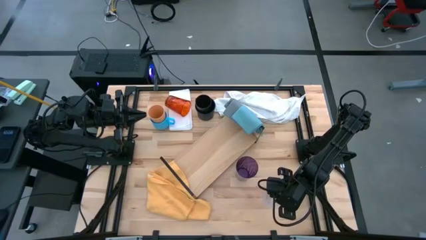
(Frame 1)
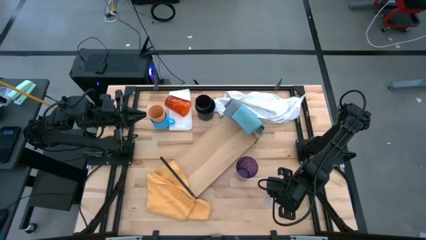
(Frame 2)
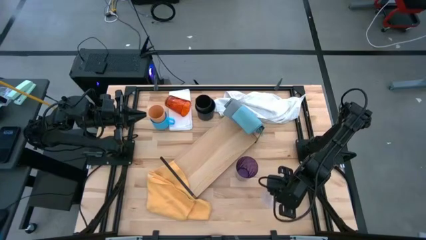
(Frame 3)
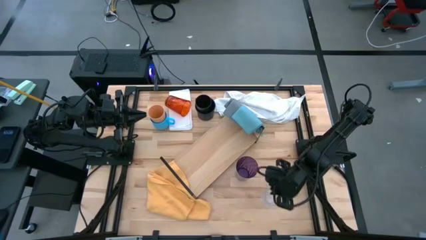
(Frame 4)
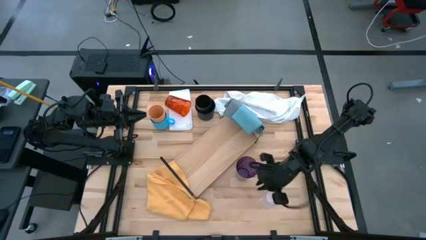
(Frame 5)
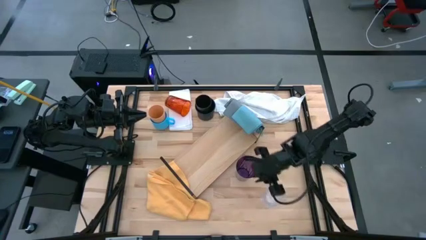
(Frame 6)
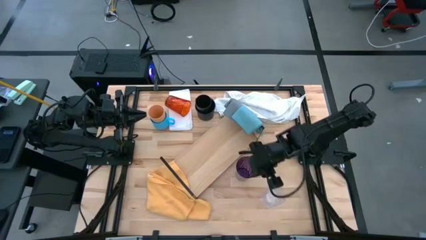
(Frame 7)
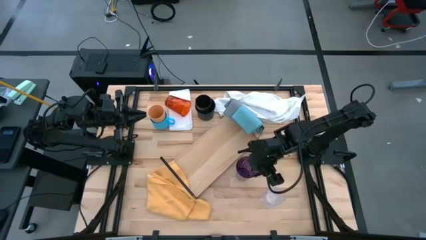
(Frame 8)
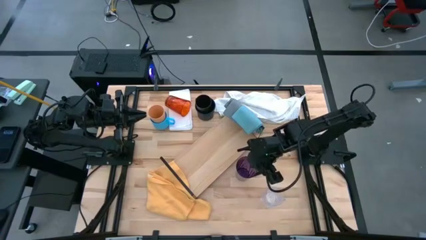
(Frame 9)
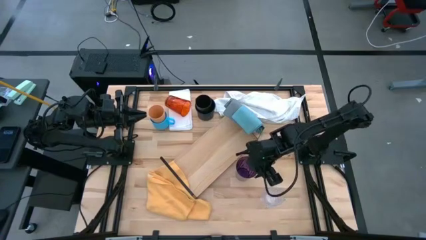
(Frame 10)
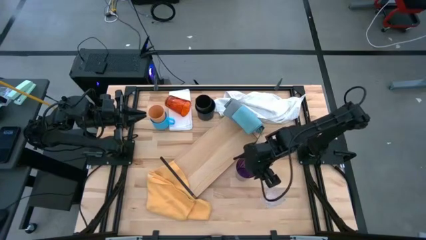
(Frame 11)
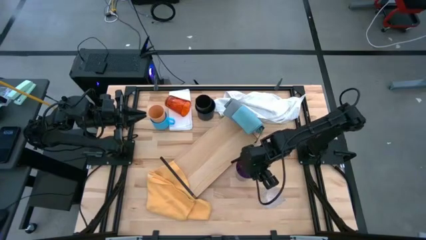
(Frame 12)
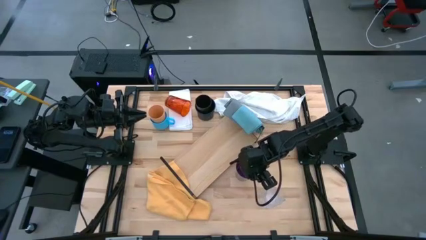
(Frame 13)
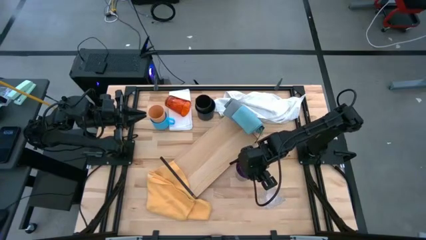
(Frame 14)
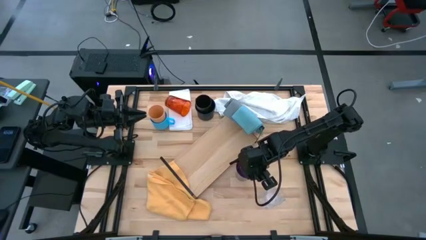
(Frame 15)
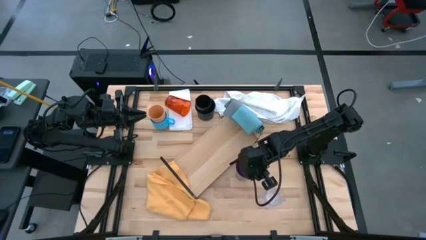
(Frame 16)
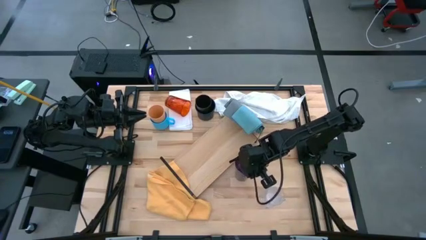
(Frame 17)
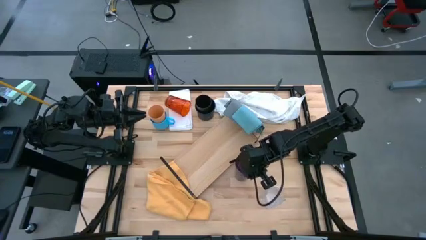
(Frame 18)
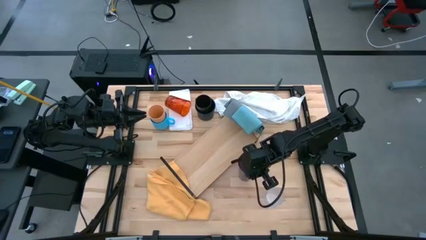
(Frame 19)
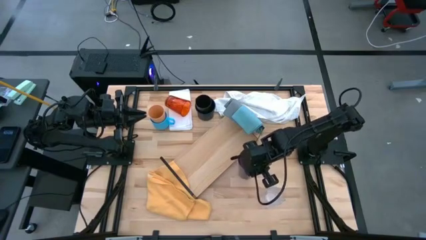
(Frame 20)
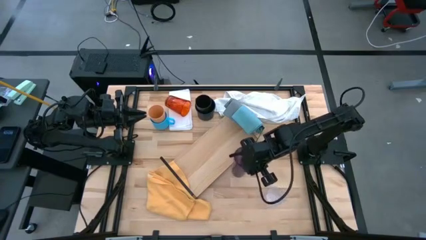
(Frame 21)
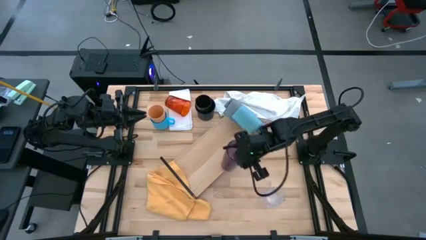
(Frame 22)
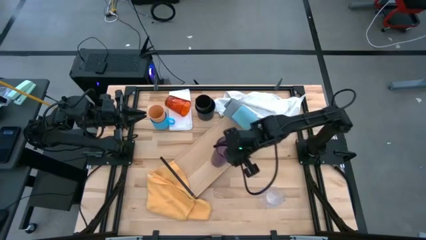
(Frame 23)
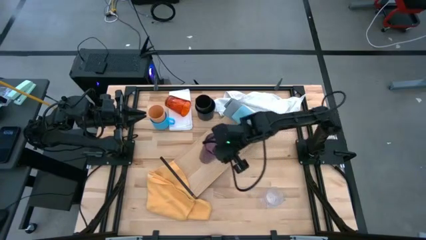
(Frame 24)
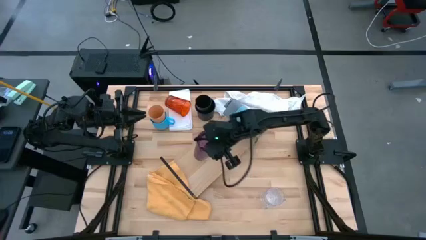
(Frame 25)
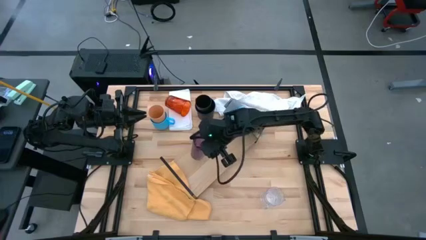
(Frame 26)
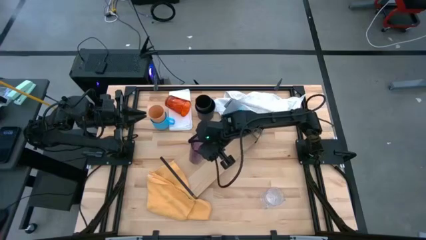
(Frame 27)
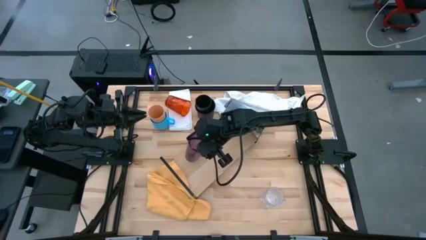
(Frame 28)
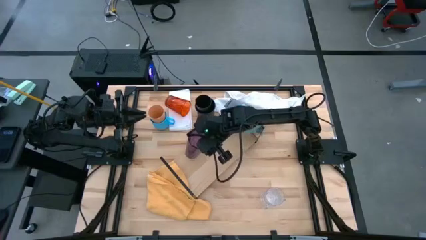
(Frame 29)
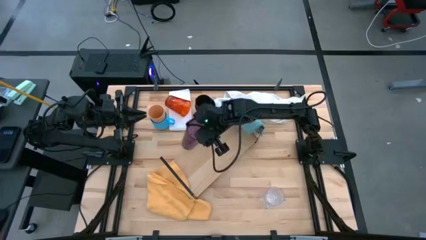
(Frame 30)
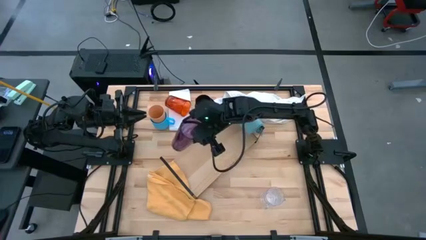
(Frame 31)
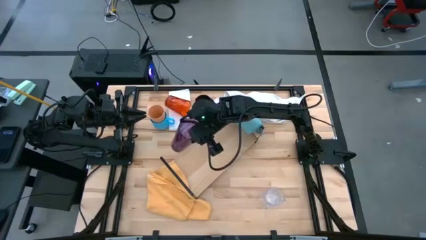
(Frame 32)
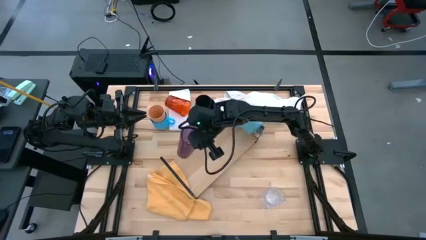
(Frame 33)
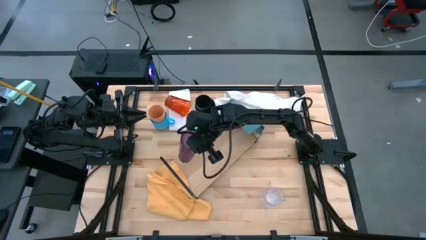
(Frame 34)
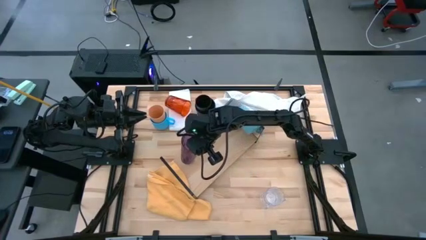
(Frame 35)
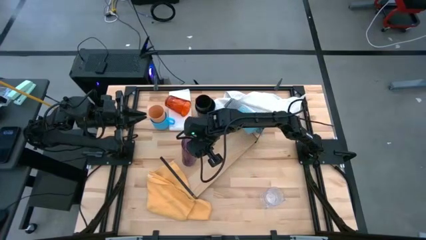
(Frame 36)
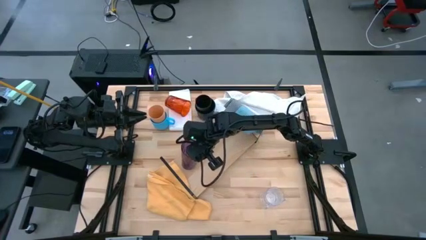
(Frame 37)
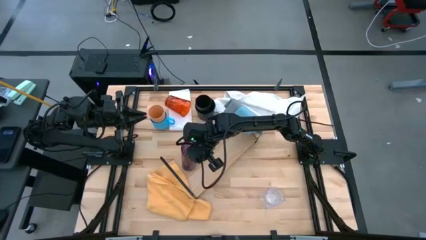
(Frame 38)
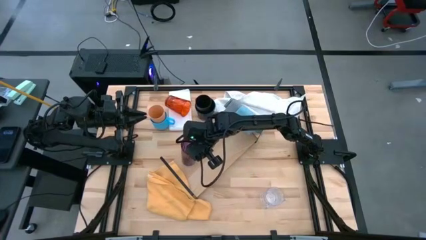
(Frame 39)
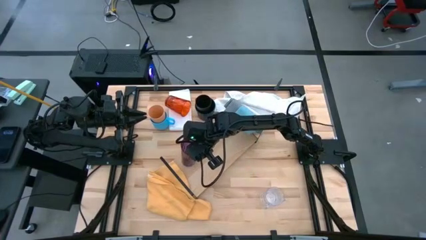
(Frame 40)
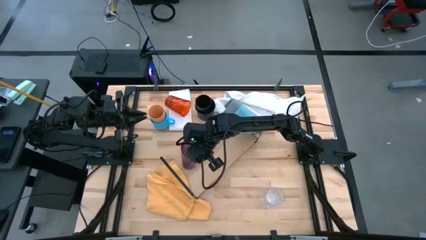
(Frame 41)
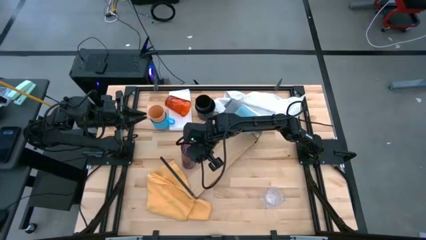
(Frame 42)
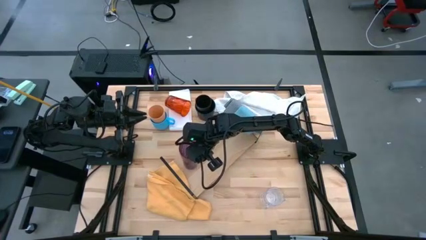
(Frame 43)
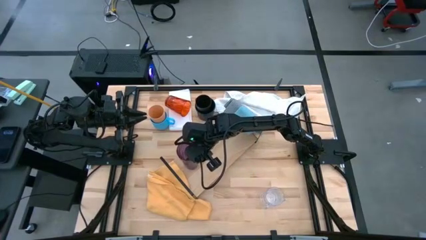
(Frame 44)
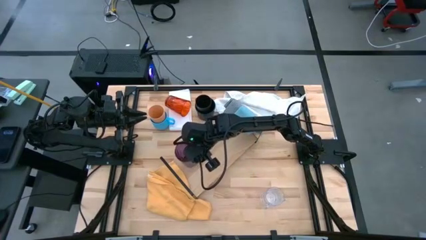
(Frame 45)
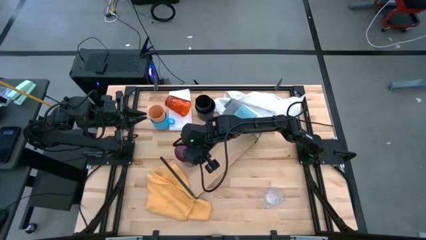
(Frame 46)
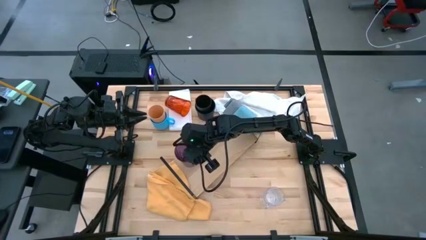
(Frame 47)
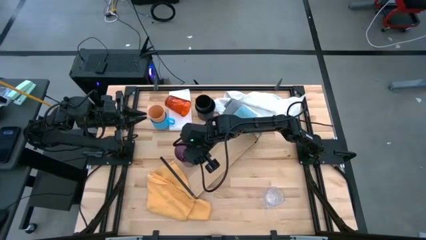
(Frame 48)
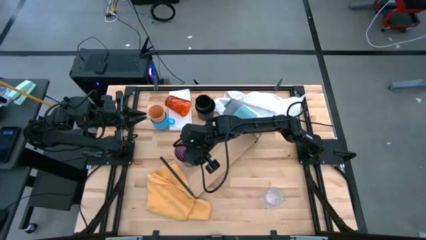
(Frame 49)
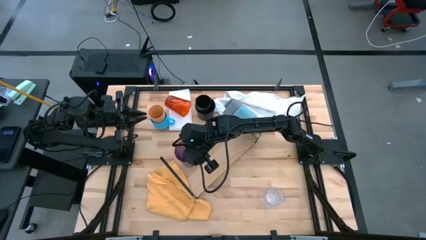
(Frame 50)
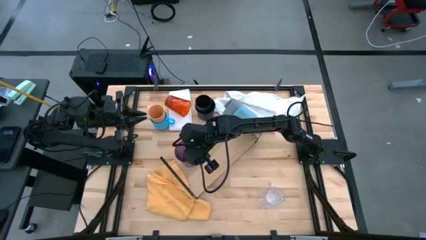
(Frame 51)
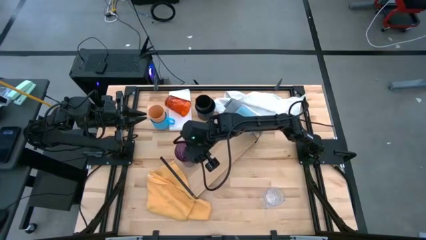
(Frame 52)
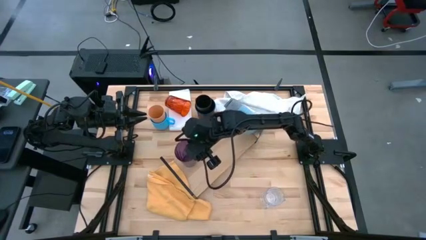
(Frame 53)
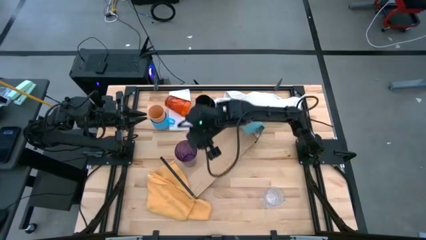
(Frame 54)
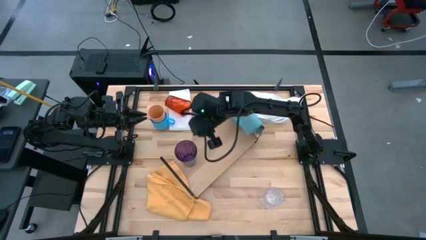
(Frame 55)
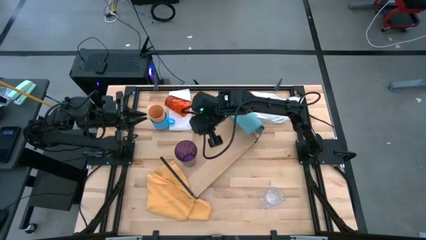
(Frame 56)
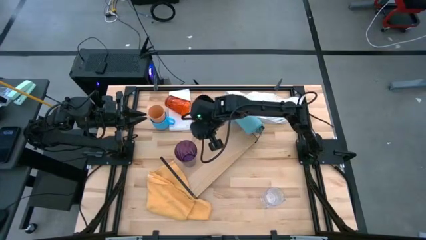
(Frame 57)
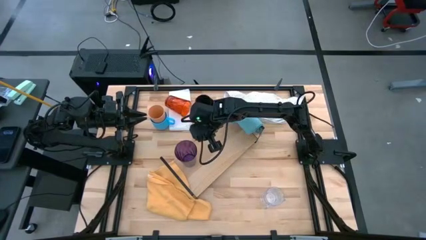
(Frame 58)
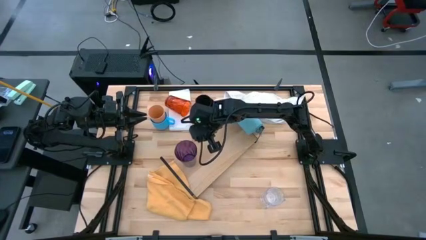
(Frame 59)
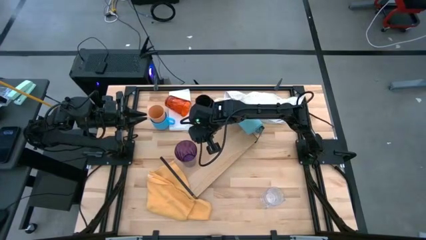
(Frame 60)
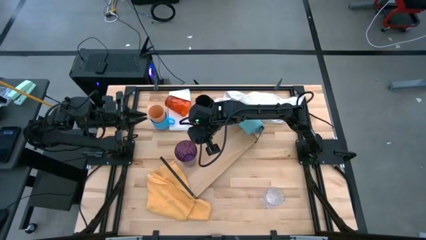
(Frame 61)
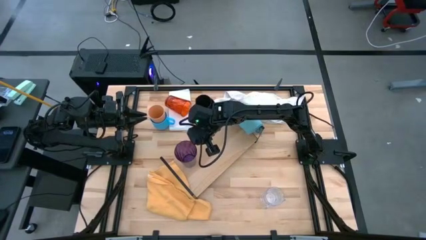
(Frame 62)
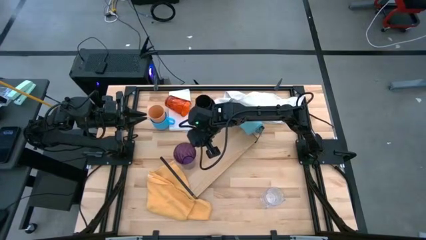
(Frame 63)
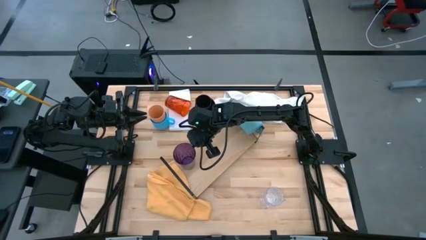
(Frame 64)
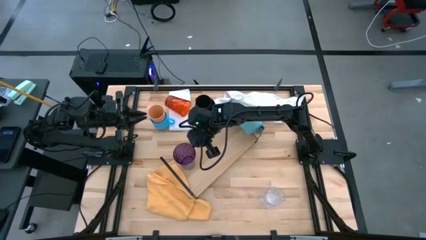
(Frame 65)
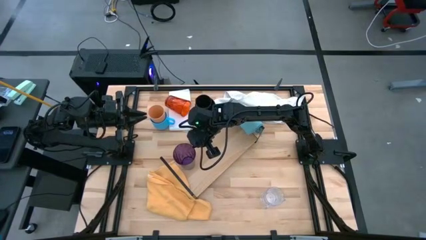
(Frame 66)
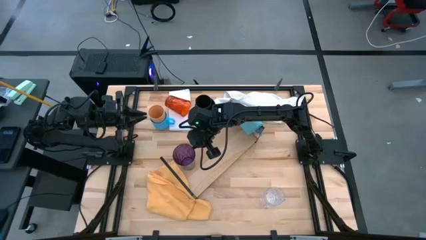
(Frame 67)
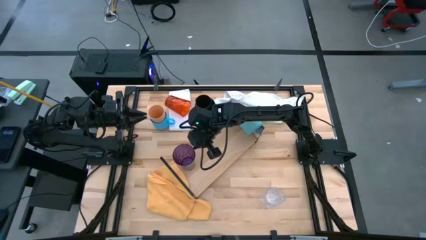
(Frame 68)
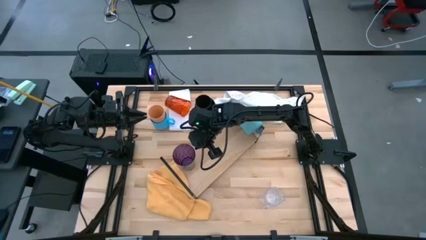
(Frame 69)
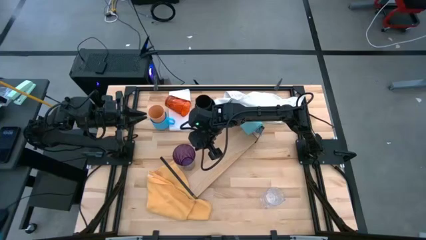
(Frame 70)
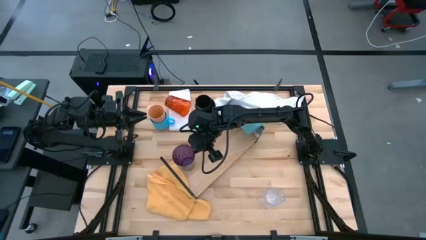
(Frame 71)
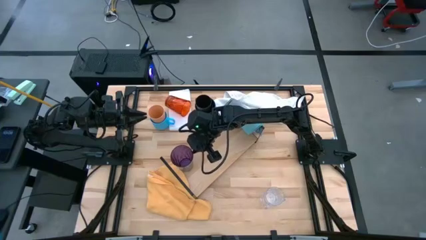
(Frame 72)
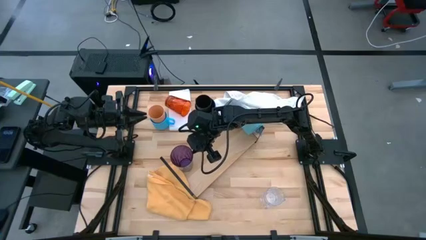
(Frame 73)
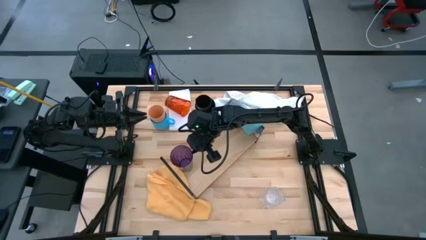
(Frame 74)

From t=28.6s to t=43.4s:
Task: Stack small to large cups/mugs on shelf
Put the violet glass on the shelf
